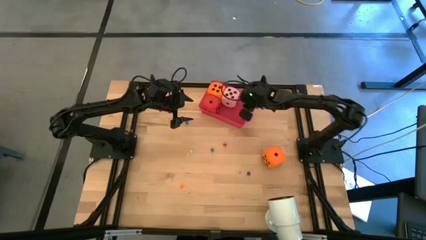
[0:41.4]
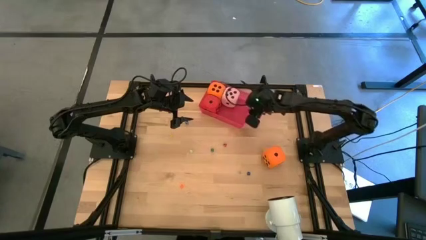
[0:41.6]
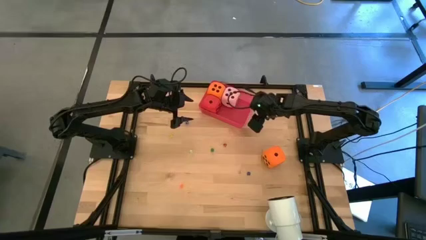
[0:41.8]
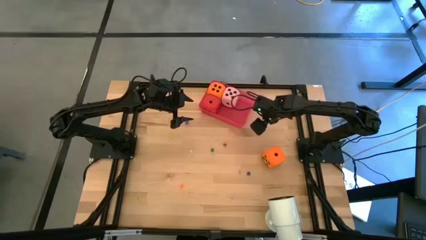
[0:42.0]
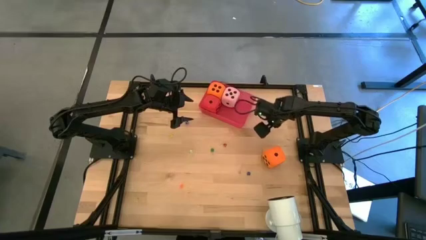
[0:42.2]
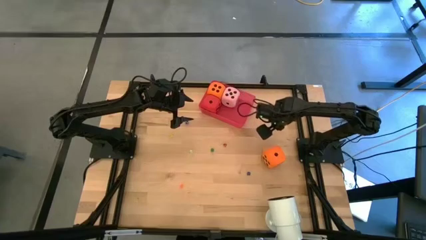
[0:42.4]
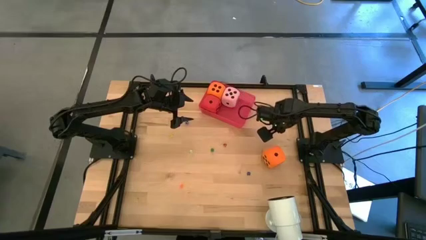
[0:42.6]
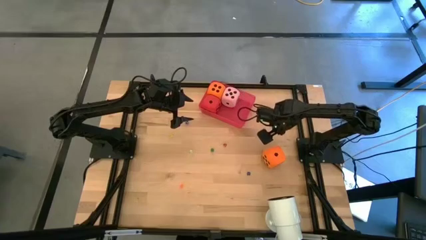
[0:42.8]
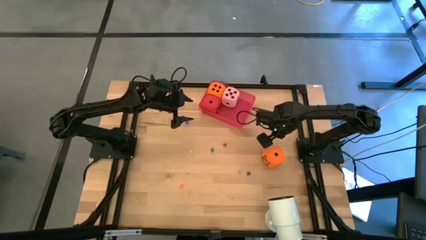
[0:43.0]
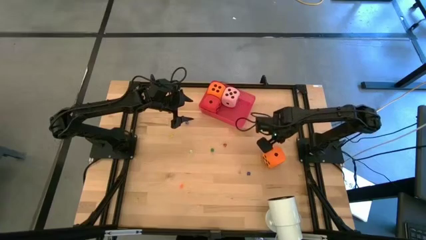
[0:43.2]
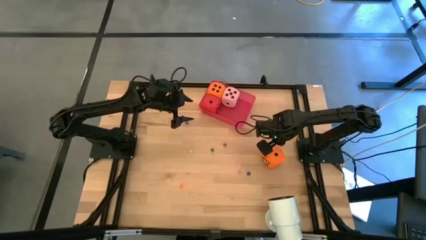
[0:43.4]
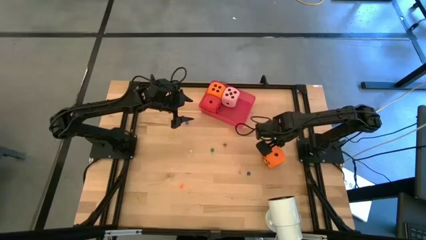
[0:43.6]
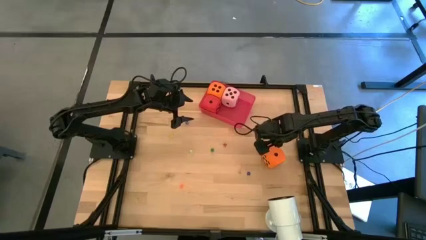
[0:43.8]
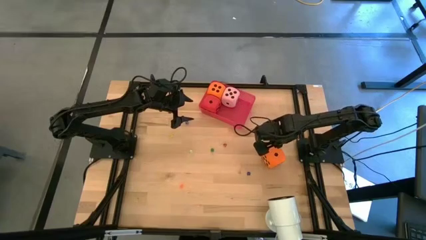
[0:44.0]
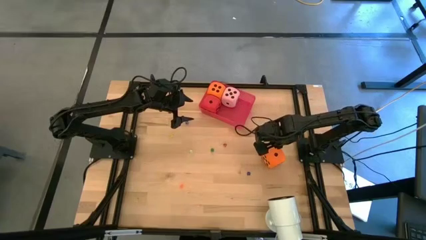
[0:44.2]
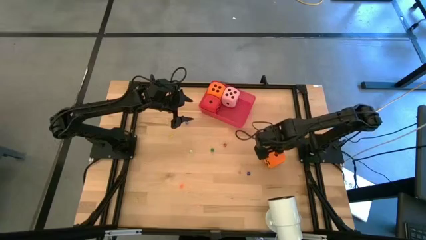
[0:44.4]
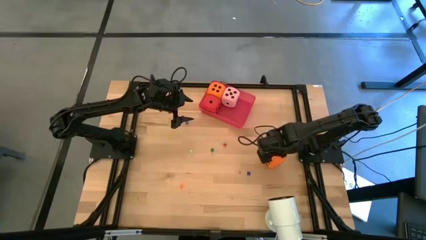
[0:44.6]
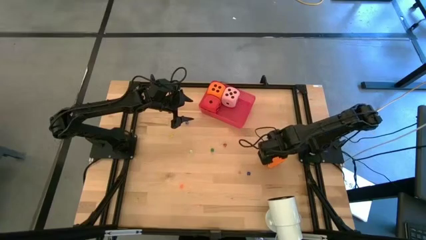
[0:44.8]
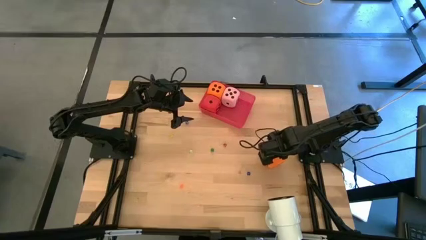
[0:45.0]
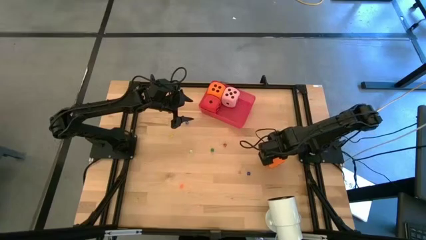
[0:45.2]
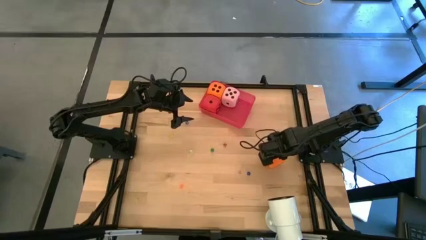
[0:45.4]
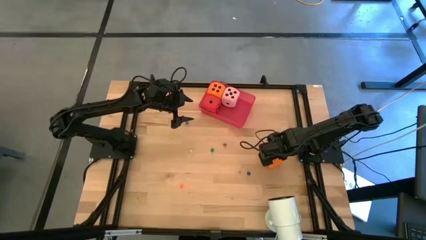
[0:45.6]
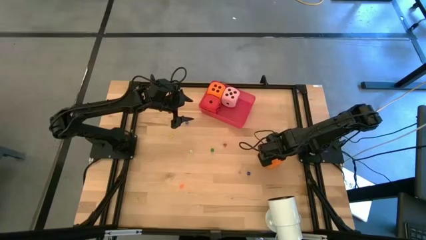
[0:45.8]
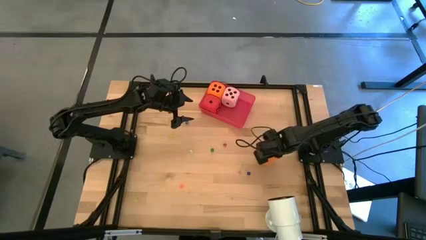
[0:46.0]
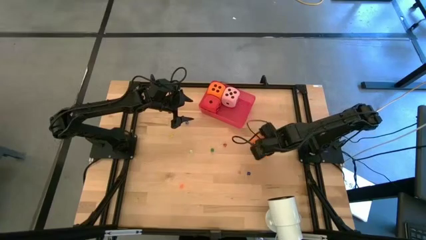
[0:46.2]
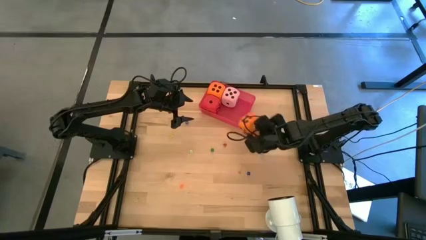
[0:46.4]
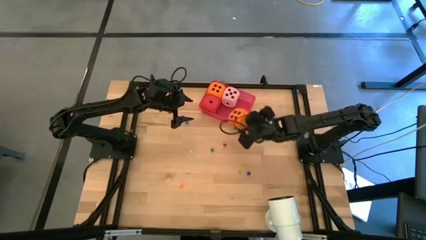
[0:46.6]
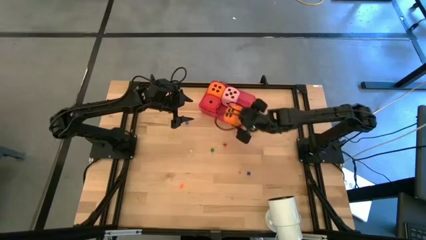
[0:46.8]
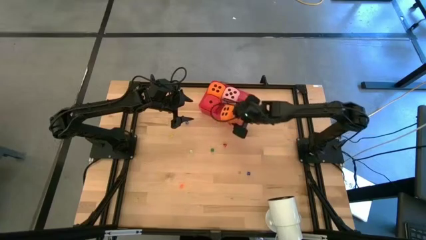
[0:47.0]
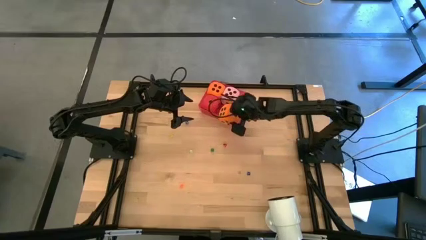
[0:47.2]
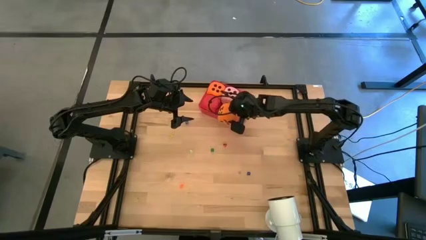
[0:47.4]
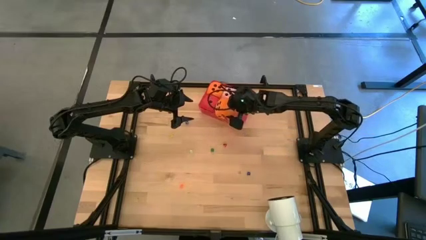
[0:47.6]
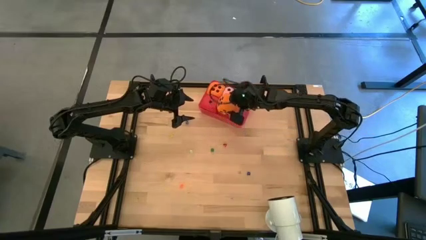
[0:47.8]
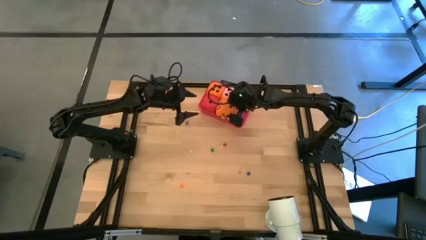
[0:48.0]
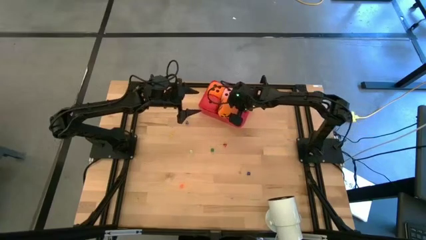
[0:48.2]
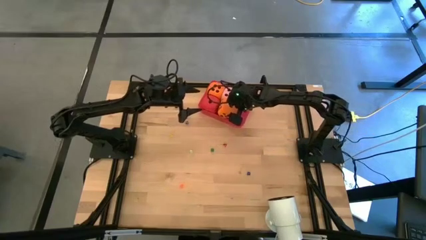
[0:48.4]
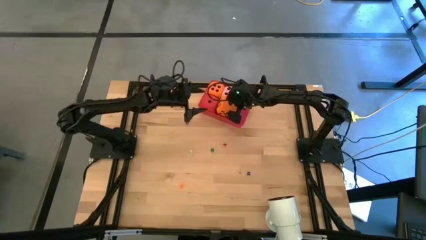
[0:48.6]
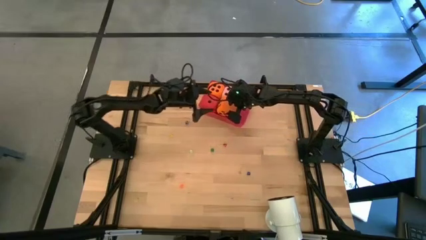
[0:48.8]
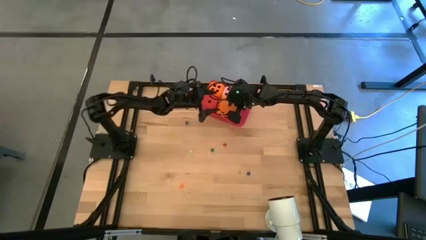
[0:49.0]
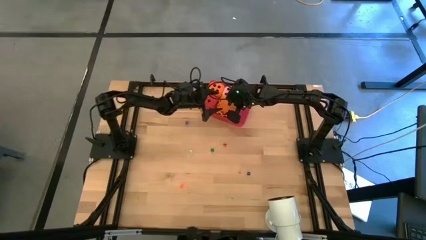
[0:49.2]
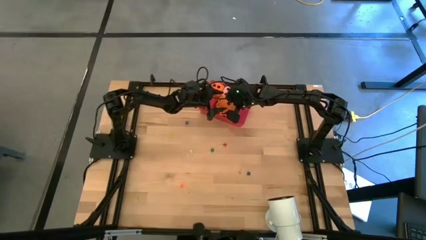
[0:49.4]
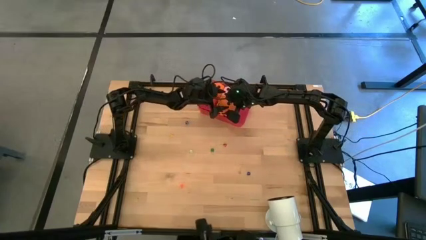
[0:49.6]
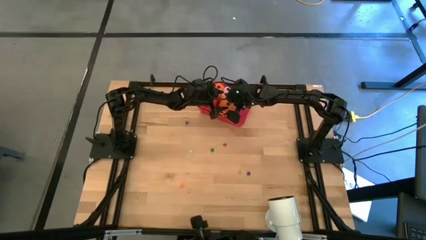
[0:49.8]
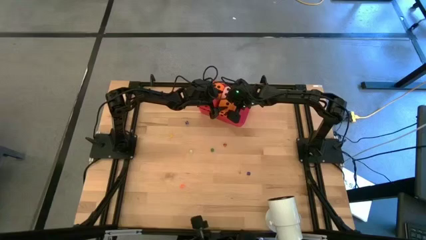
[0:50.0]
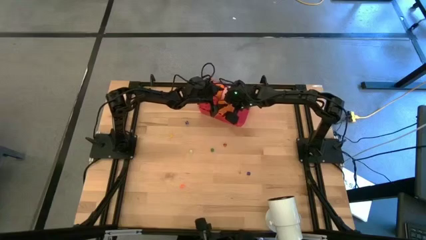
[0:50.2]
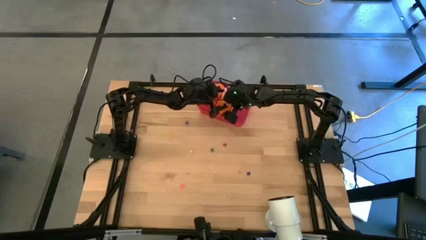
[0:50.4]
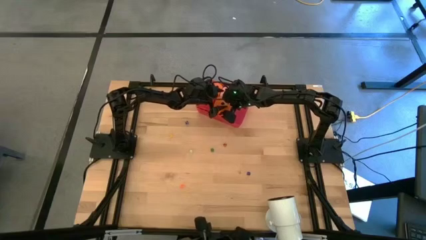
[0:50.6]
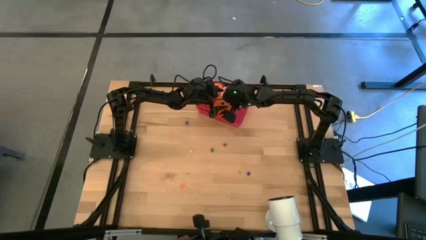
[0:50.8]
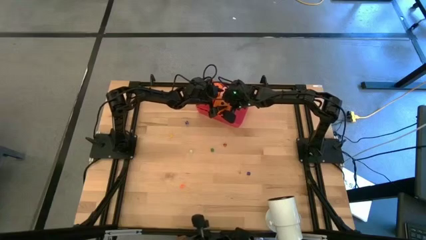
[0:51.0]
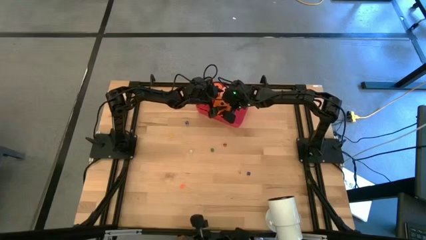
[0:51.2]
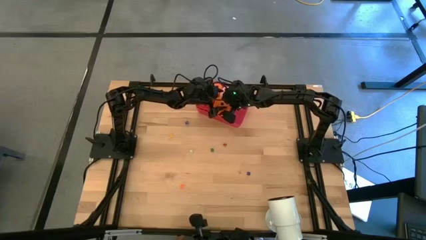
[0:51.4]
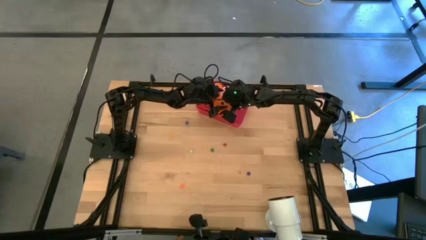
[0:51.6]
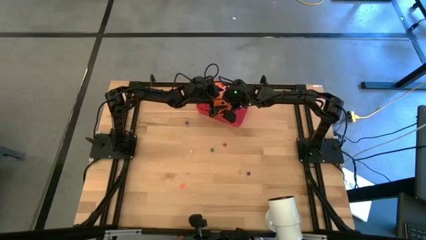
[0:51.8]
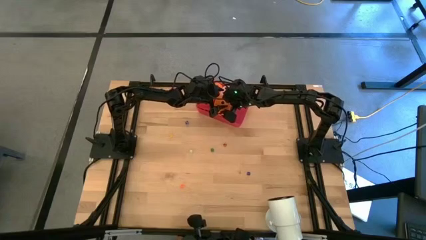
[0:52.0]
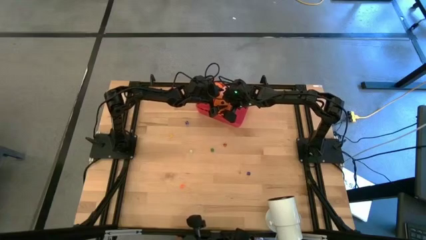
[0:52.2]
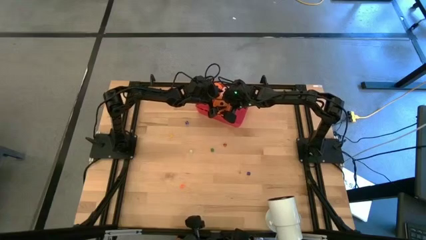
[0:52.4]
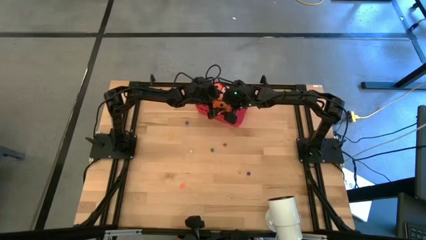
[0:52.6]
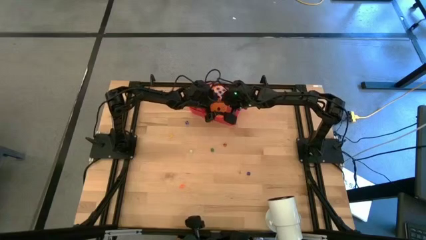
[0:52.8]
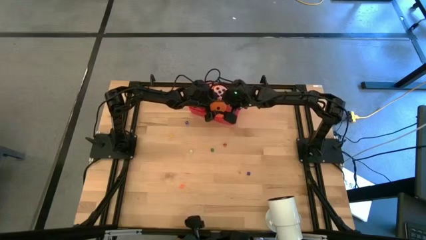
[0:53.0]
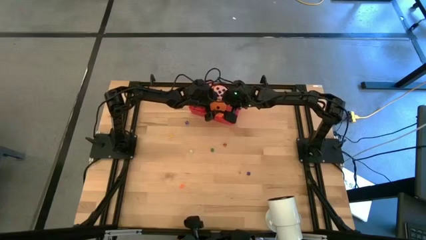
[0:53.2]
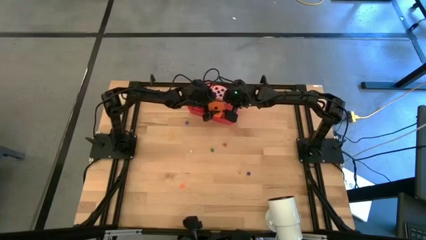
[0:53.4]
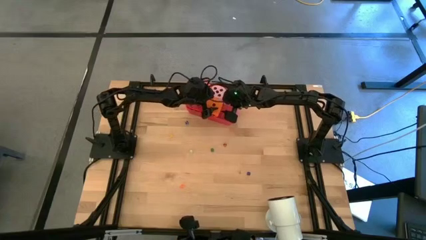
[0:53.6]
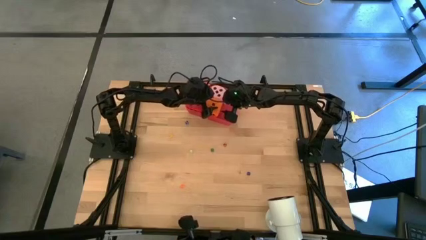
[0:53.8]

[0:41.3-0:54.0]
Task: Pick & Place Dice
Put the large orange die into the red bin

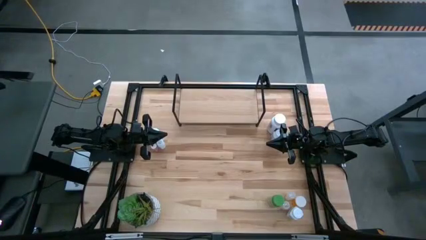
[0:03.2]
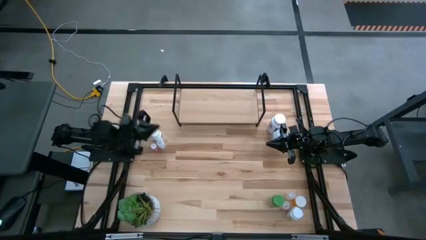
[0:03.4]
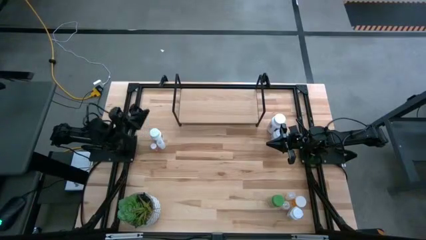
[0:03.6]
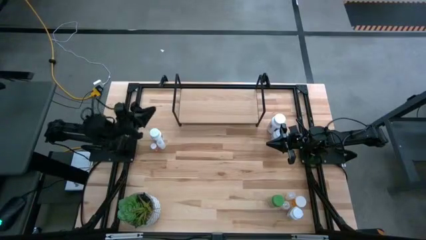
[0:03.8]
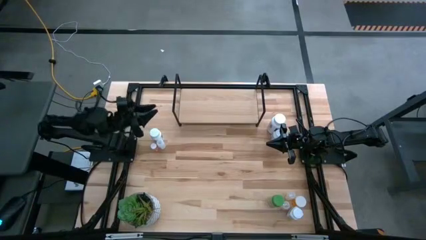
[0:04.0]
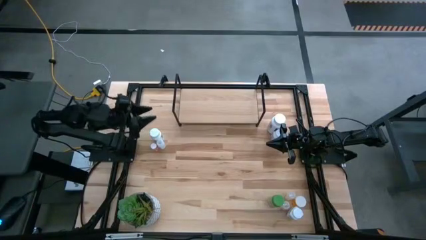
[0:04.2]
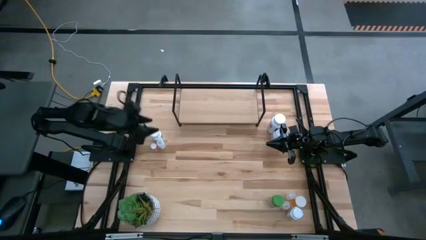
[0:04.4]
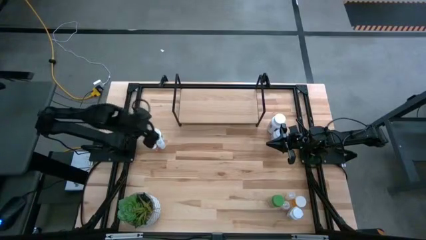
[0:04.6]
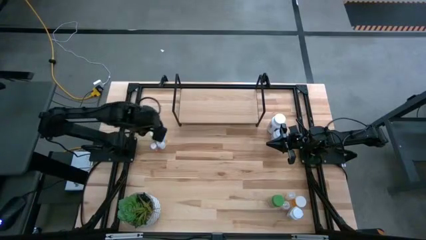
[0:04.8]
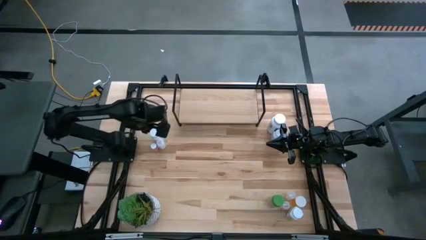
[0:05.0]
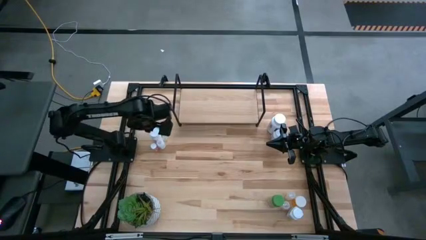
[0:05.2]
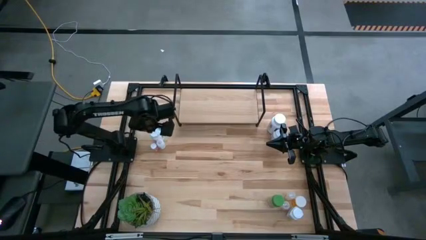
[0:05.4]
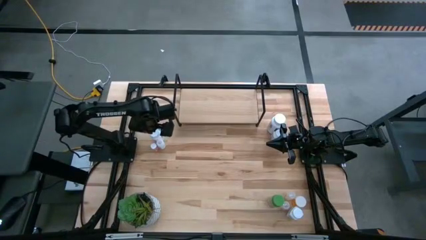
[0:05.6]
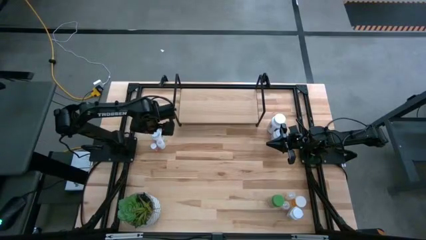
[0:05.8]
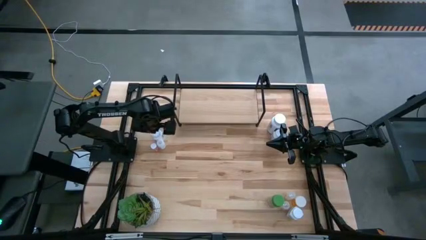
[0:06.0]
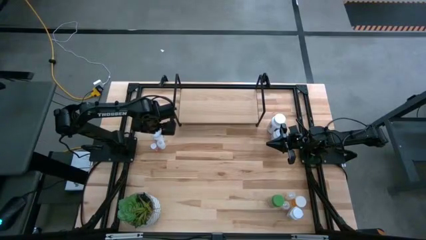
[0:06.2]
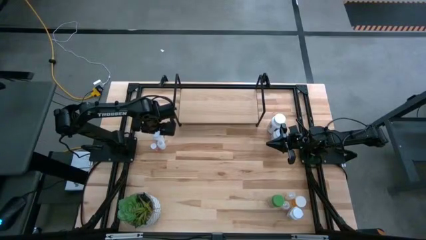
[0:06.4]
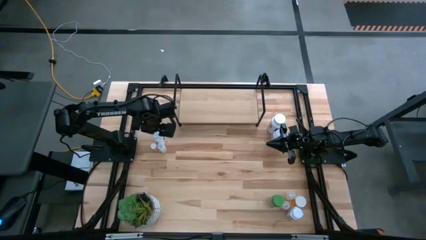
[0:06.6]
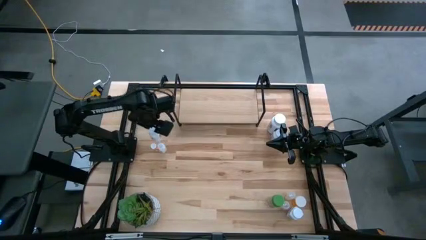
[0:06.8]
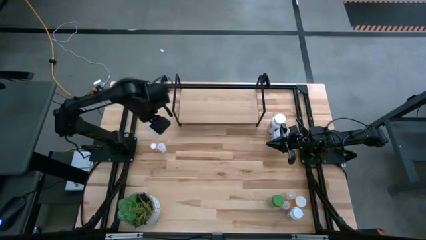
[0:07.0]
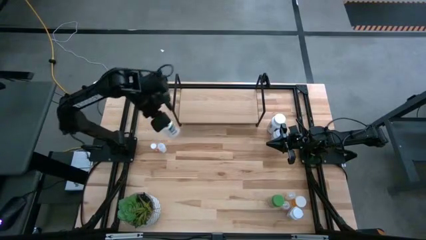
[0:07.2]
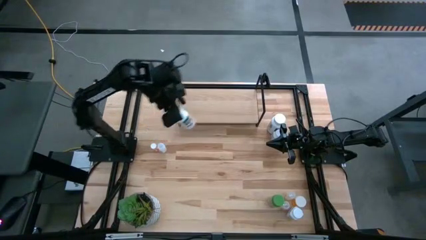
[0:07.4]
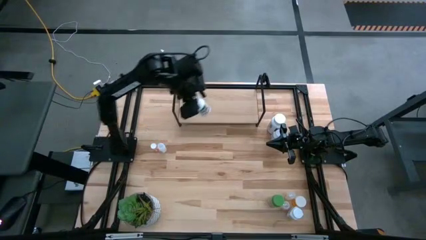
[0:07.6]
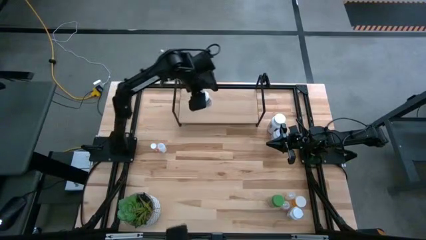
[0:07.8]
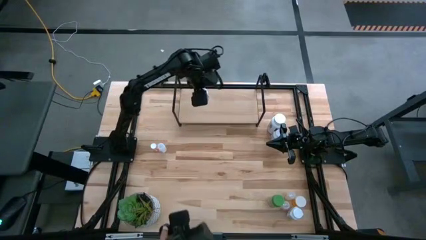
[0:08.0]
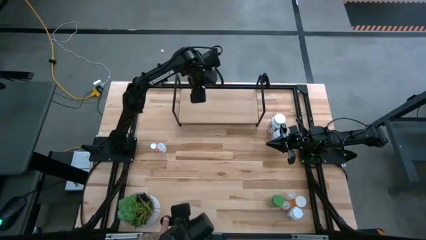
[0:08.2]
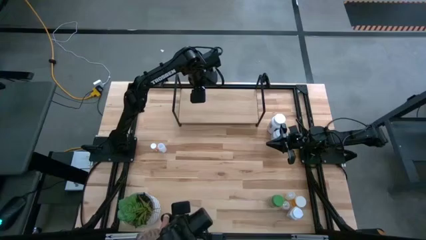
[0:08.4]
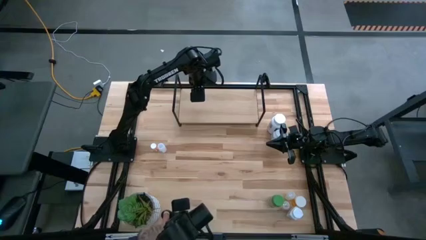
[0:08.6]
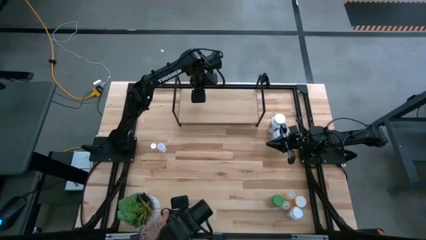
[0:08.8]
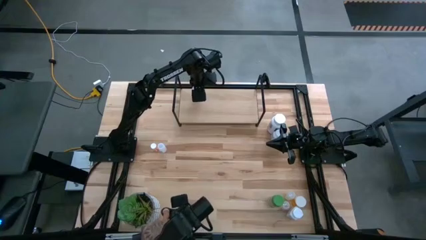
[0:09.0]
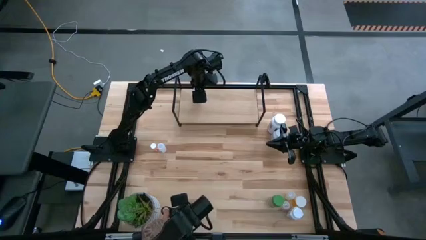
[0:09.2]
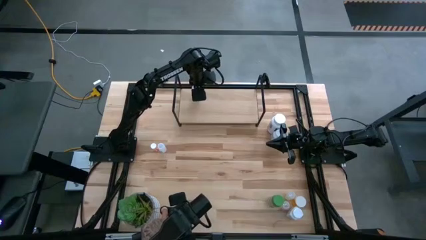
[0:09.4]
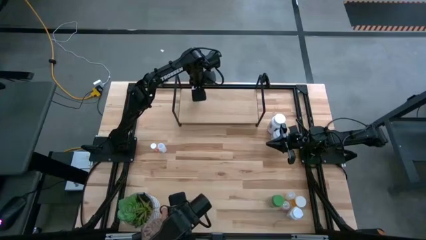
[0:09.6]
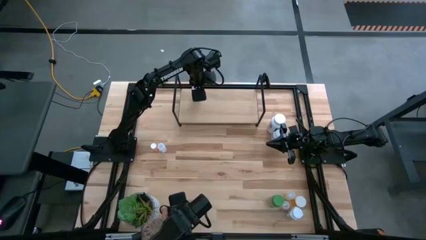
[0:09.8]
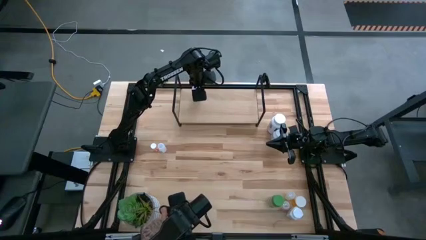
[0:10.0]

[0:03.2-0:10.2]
Task: Pick and place medicine bottles onto shelf by color
Put the white pill bottle on the shelf
